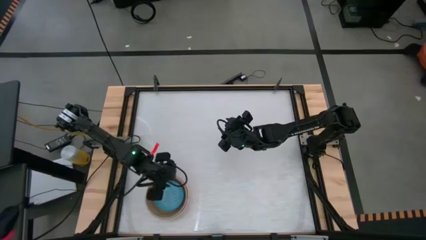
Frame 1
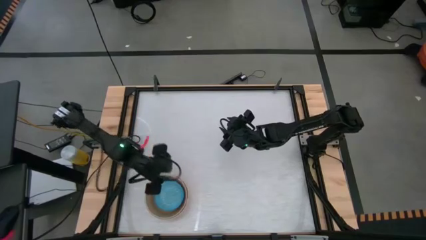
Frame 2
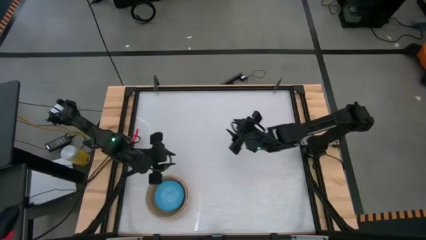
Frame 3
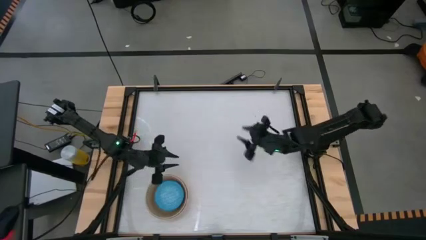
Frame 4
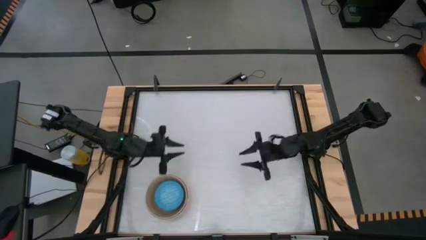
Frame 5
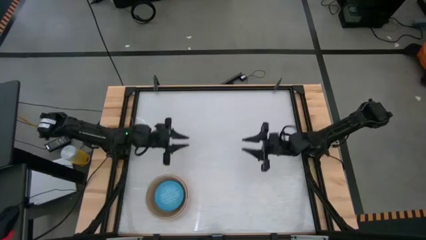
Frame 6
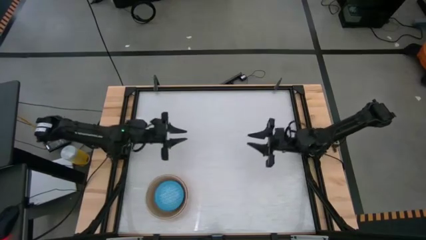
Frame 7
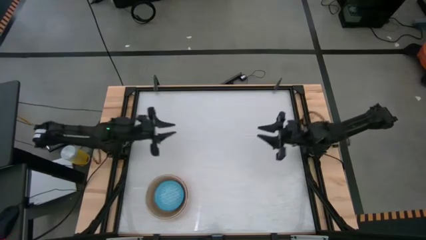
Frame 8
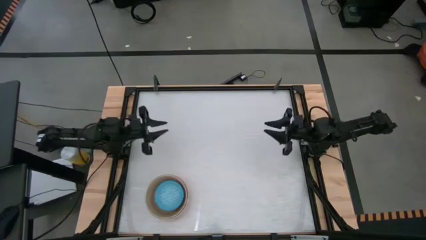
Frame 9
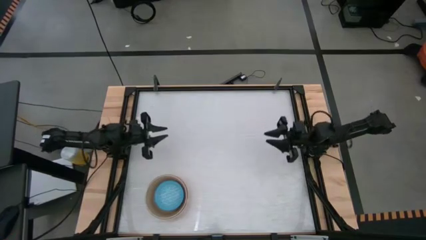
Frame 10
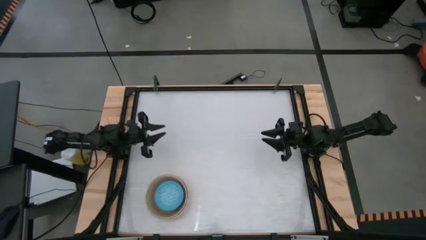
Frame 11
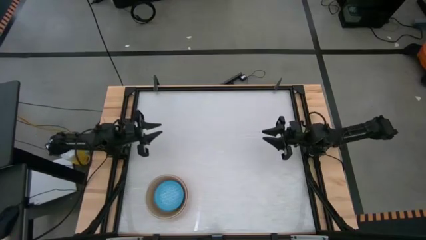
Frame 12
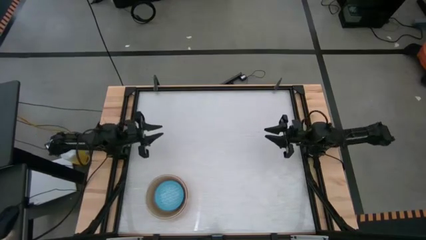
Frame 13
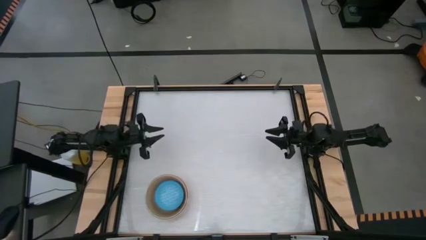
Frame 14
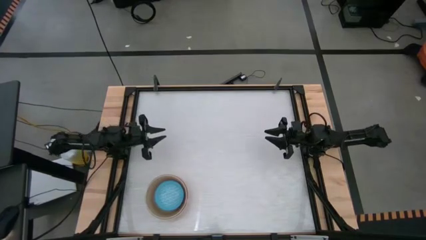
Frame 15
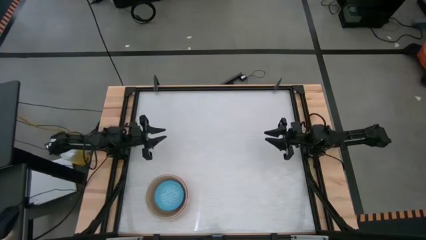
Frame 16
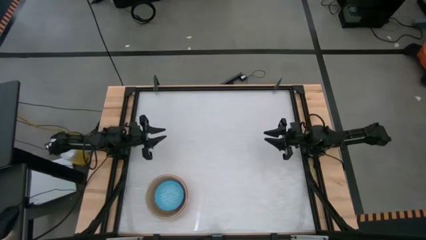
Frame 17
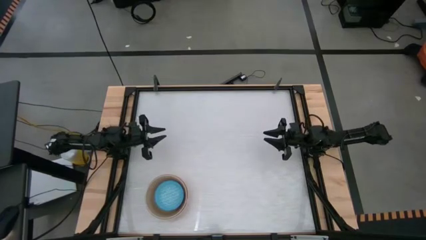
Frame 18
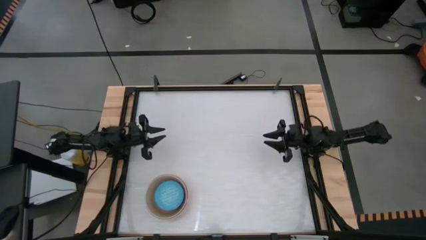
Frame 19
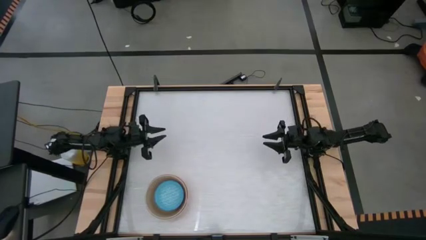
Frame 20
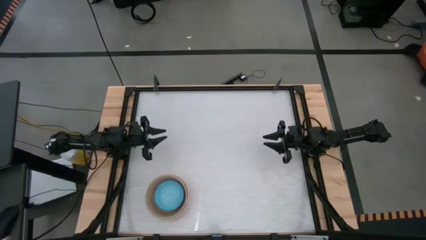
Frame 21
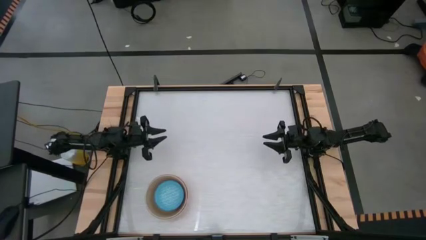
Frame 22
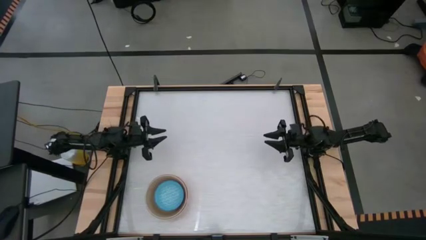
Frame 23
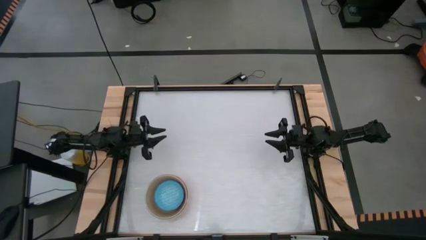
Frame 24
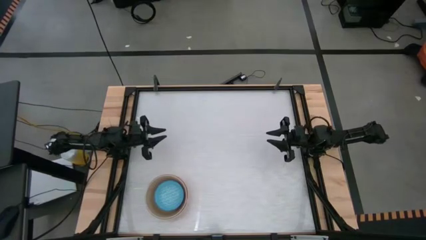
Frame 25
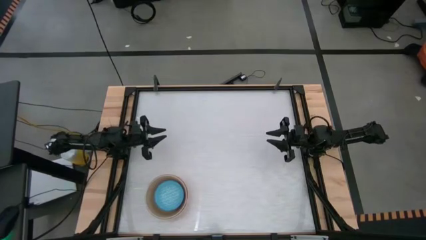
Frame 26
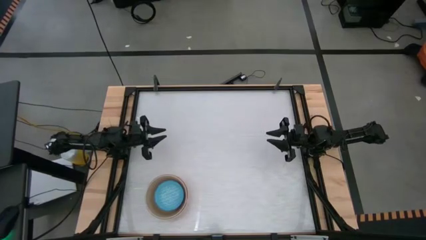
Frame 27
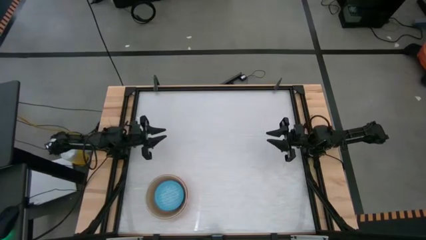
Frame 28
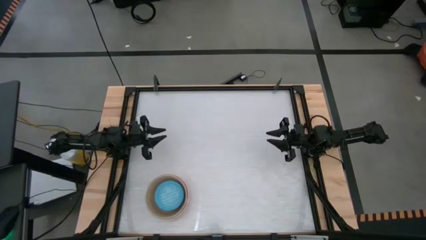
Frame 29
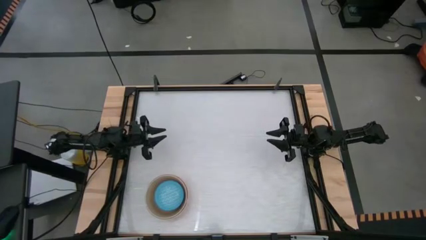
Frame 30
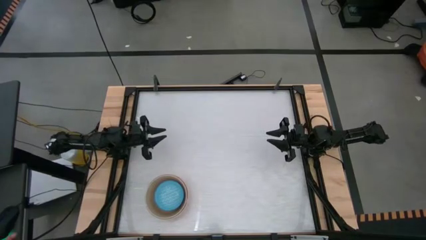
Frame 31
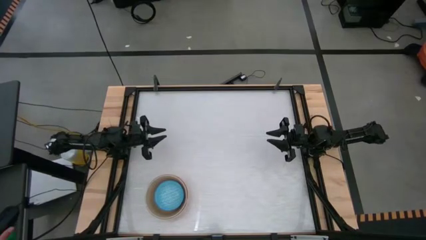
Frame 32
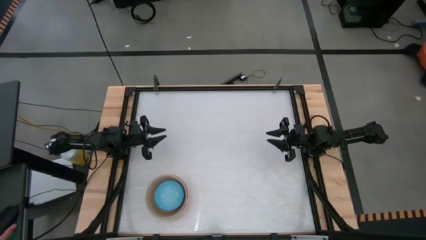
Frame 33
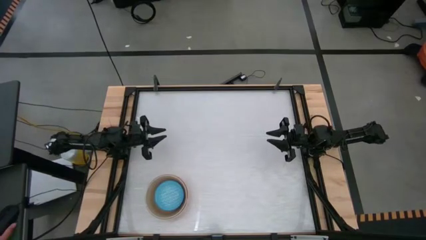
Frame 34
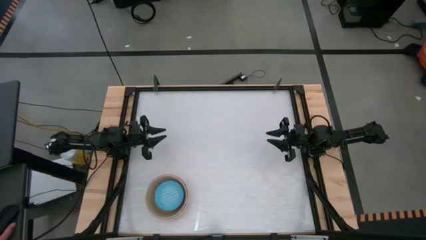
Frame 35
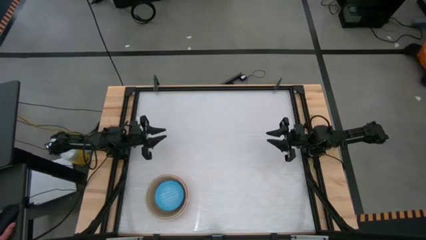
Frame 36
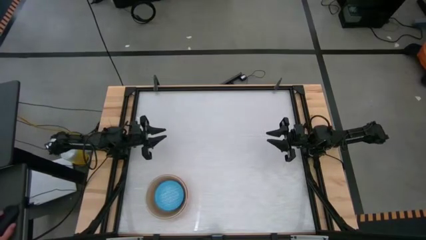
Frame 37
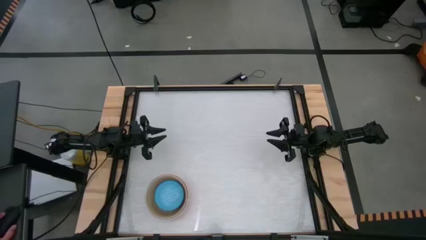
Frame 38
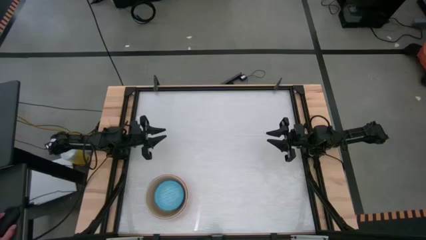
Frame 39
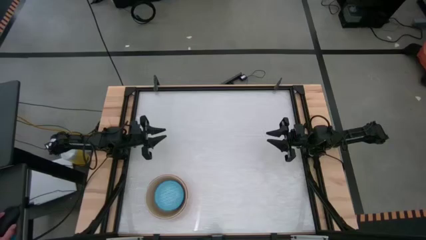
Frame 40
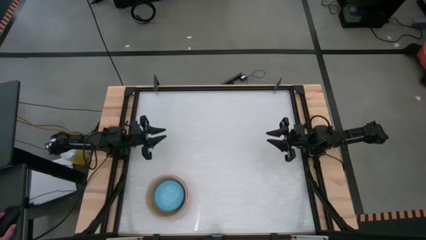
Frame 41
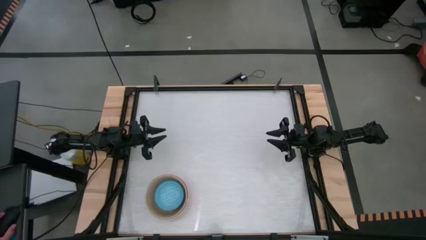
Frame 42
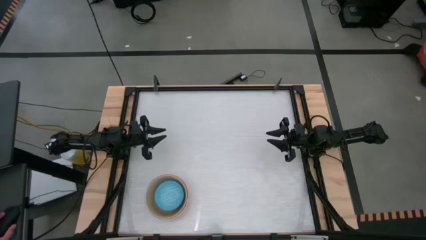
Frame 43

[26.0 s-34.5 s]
Return to Home Position

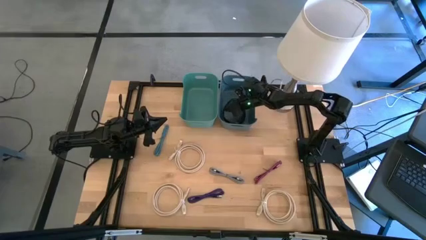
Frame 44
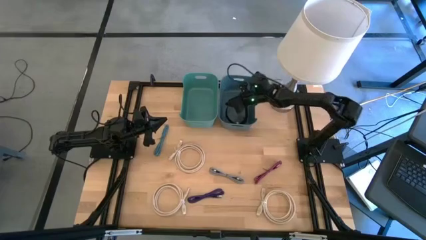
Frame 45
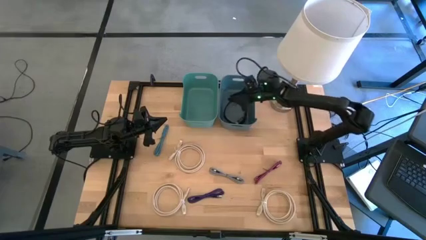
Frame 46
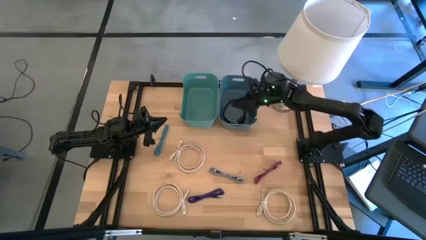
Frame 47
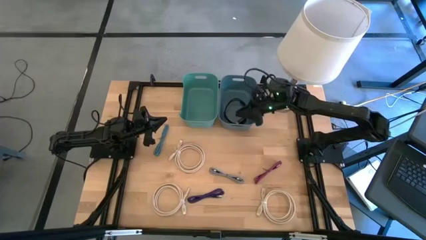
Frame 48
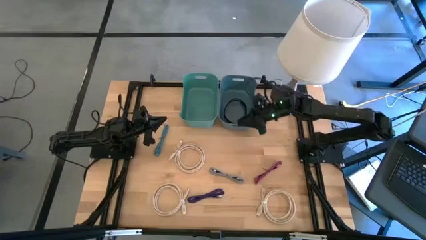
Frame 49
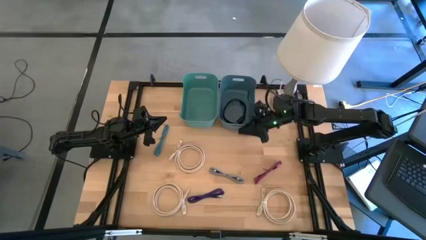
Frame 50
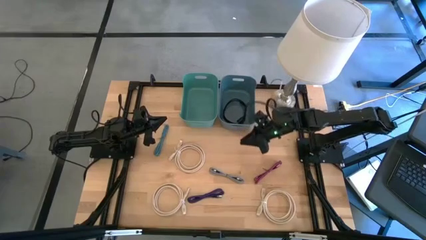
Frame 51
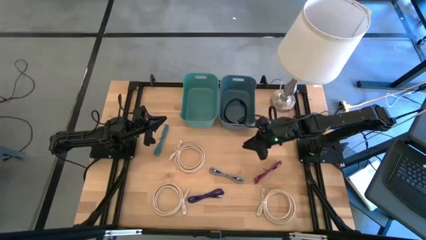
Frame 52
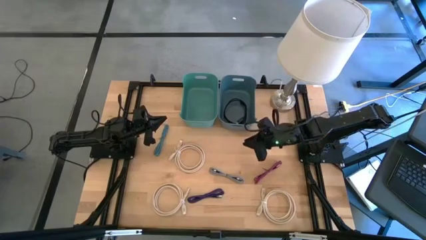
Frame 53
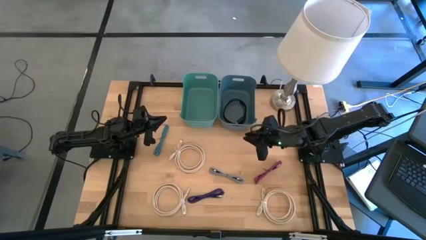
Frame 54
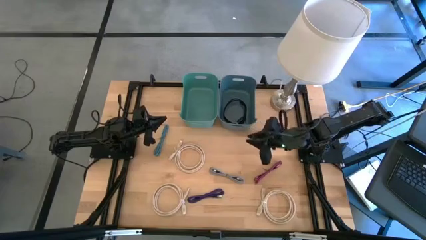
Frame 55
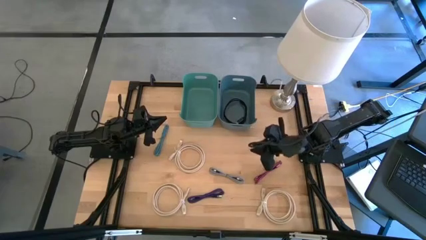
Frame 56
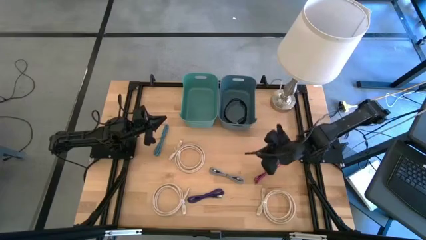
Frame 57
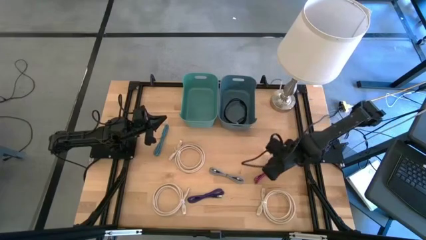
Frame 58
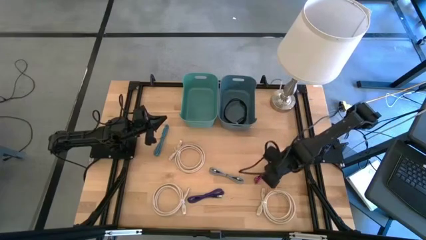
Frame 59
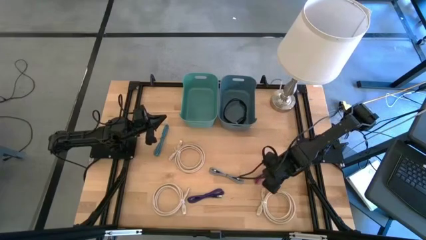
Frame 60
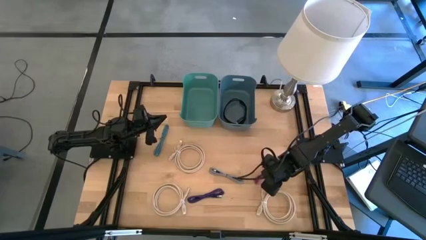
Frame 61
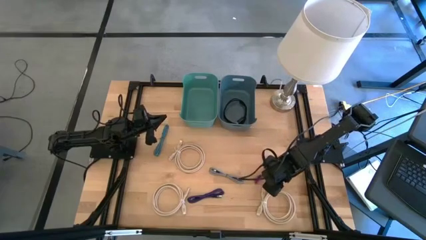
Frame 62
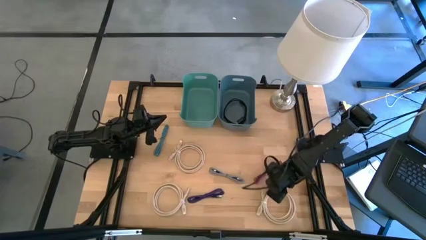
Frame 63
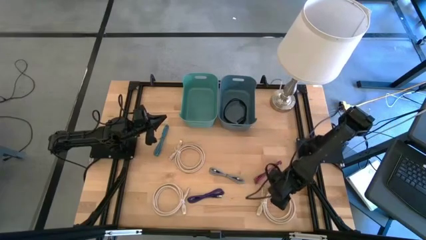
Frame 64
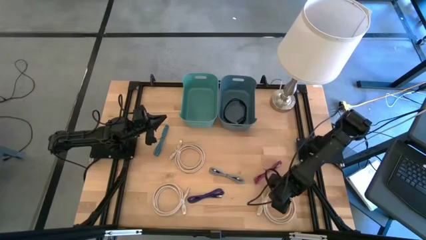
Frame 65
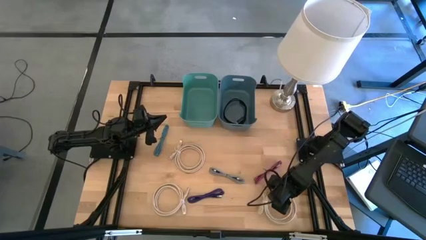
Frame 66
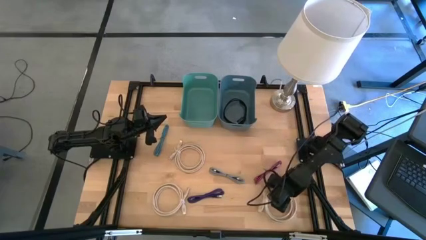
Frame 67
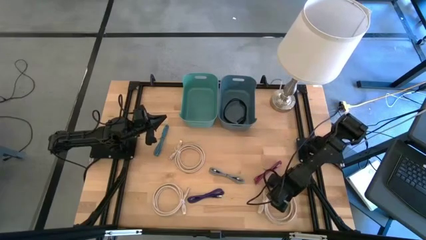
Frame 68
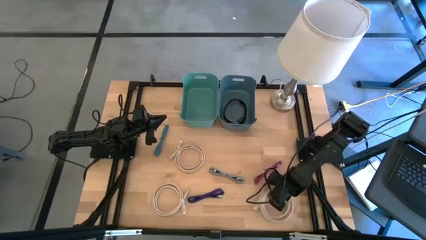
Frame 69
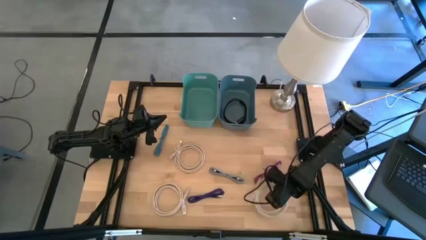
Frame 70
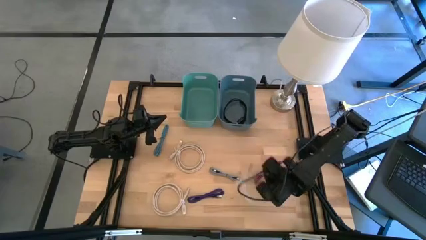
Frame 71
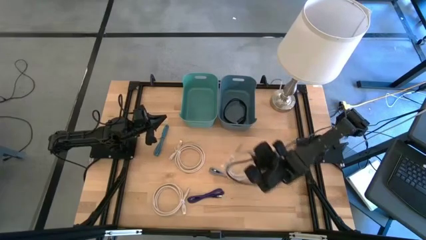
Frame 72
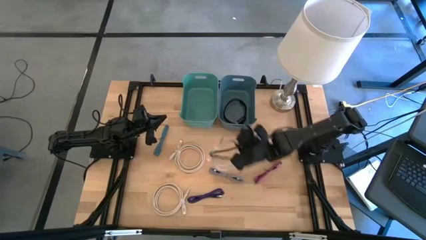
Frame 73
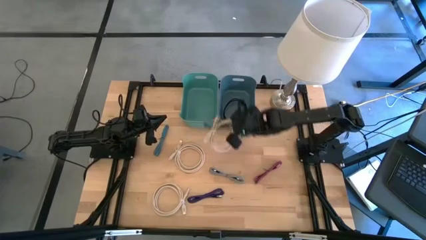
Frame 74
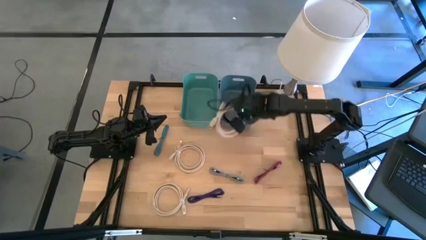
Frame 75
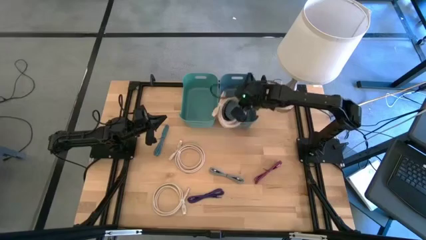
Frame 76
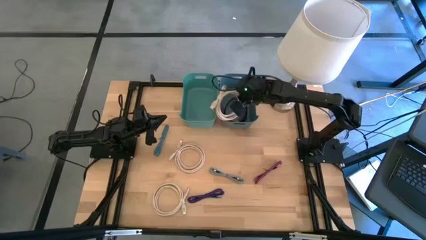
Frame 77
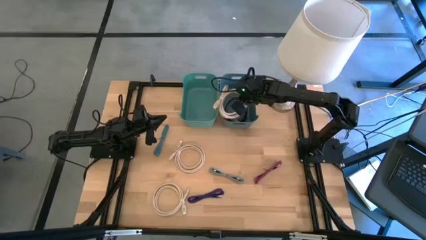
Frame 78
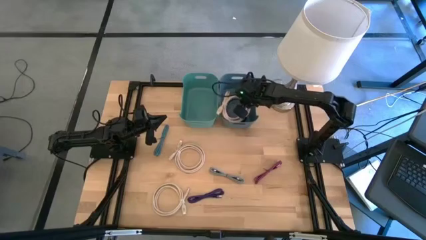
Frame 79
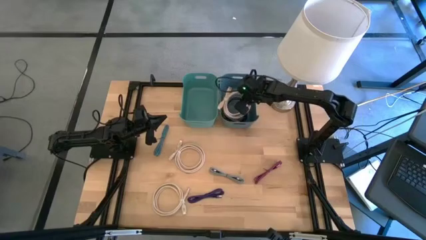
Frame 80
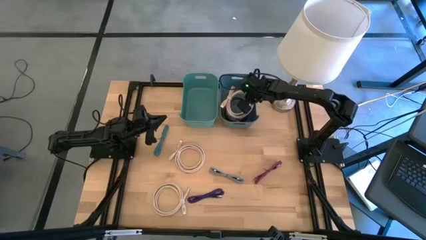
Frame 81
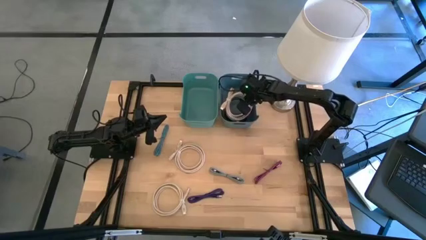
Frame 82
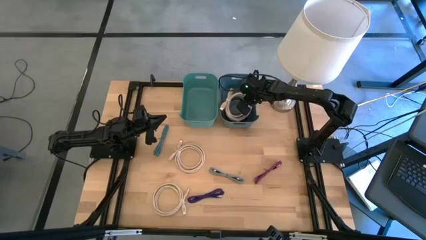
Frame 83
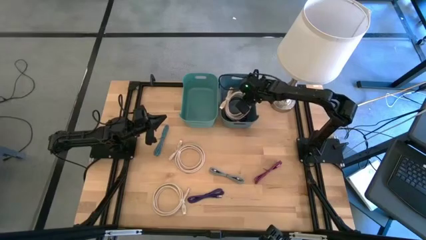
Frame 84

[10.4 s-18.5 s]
Put the bottom right white HDMI into the blue bin
